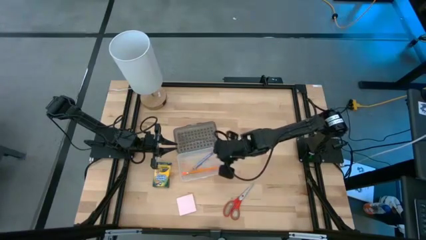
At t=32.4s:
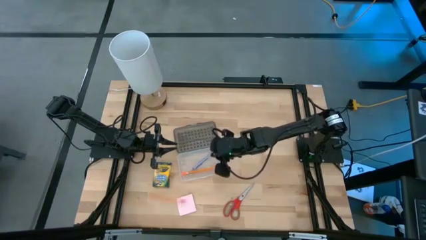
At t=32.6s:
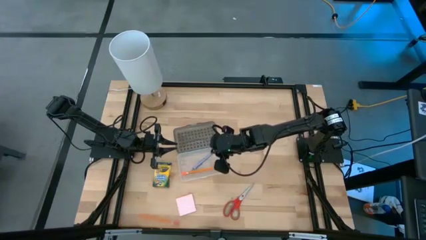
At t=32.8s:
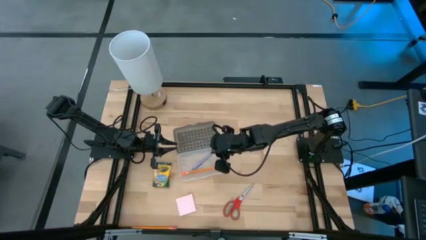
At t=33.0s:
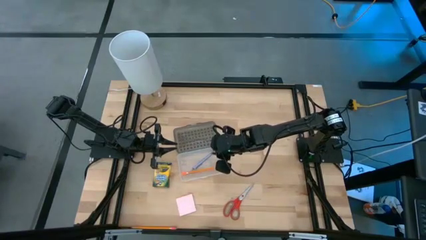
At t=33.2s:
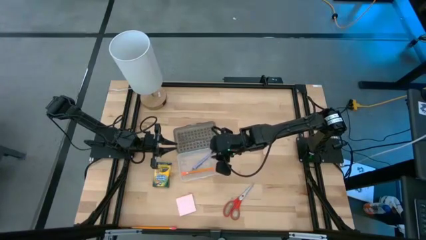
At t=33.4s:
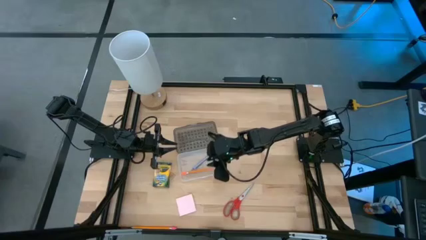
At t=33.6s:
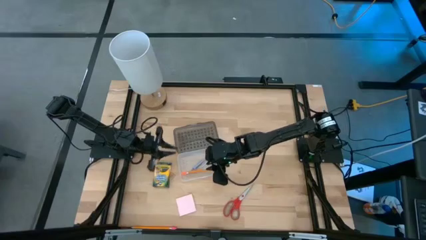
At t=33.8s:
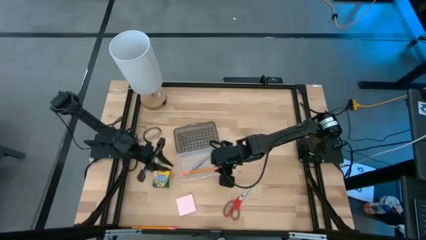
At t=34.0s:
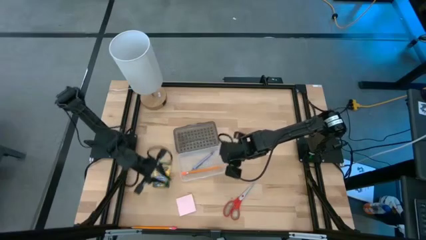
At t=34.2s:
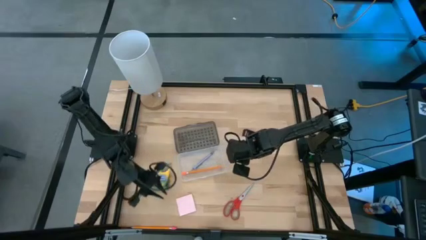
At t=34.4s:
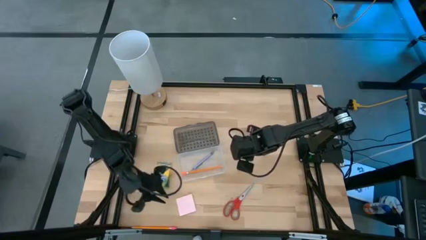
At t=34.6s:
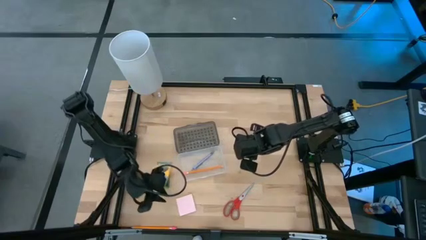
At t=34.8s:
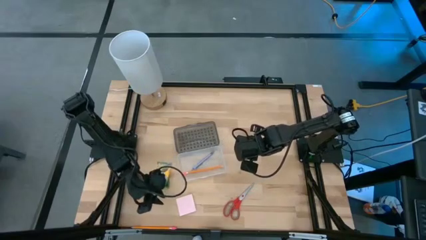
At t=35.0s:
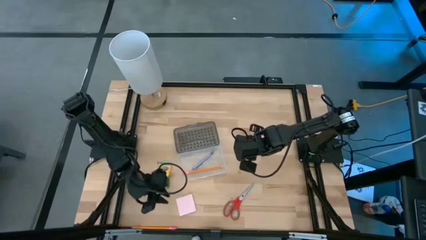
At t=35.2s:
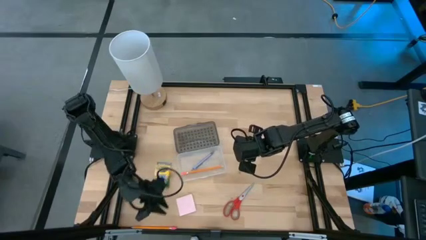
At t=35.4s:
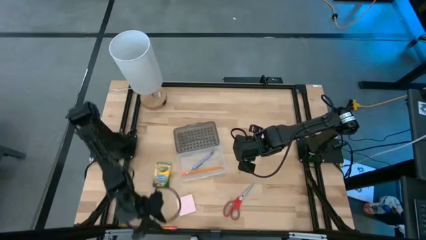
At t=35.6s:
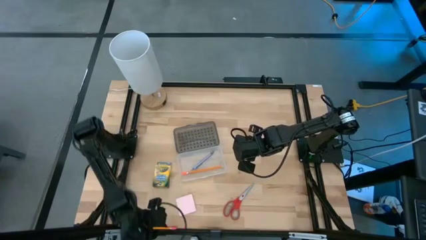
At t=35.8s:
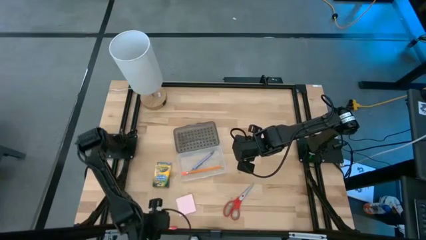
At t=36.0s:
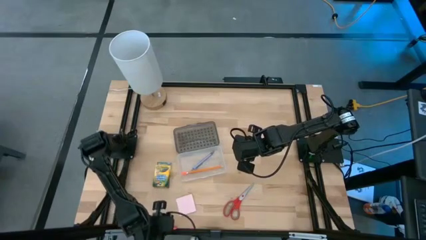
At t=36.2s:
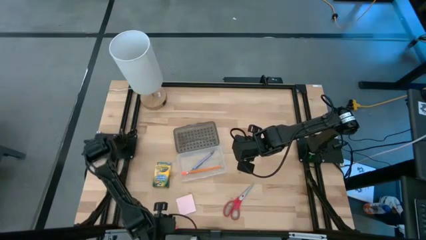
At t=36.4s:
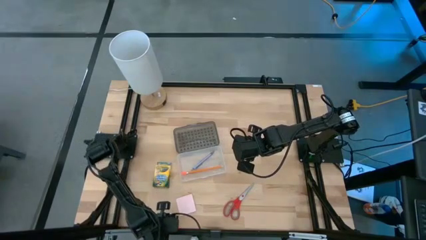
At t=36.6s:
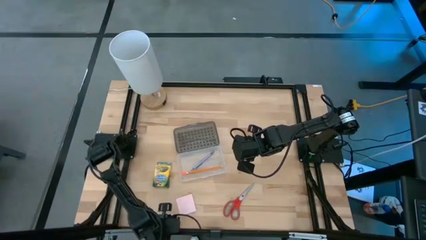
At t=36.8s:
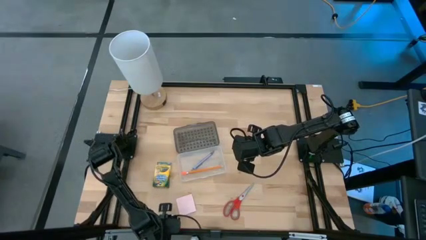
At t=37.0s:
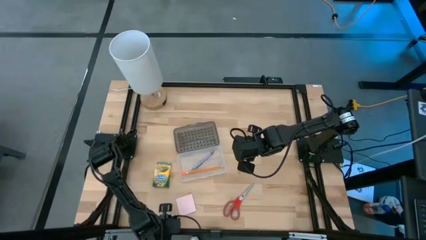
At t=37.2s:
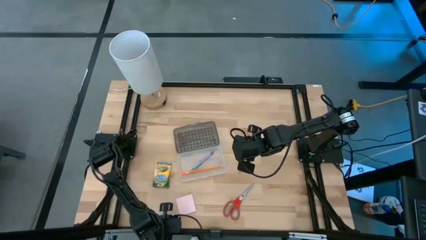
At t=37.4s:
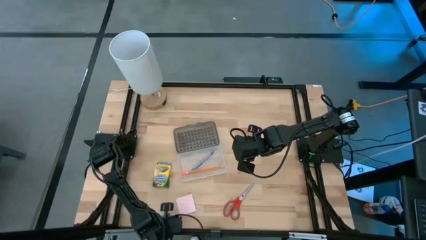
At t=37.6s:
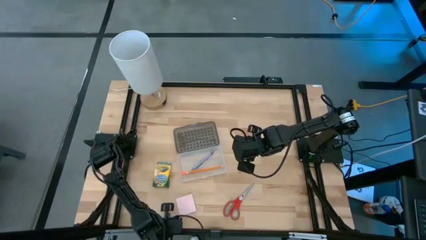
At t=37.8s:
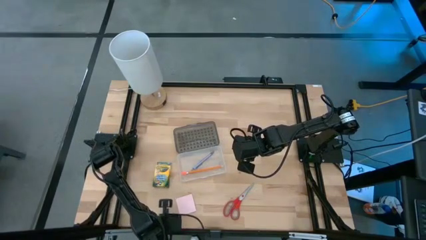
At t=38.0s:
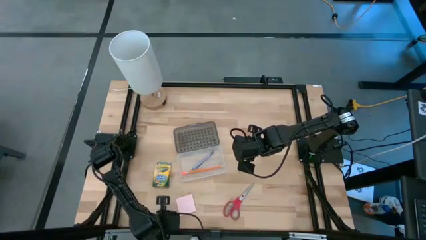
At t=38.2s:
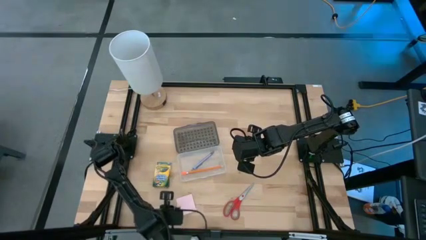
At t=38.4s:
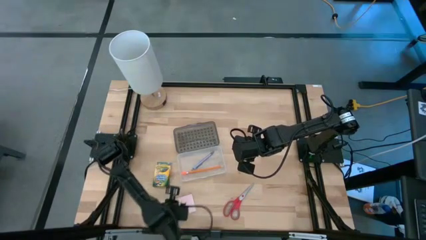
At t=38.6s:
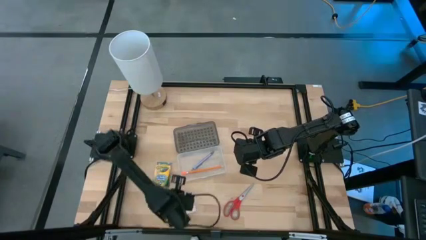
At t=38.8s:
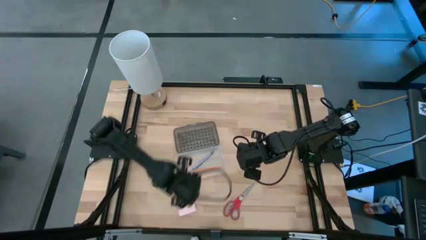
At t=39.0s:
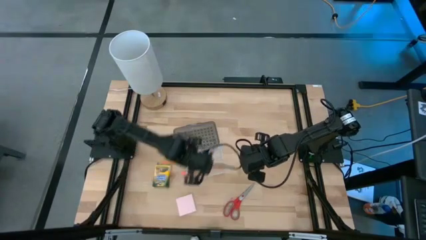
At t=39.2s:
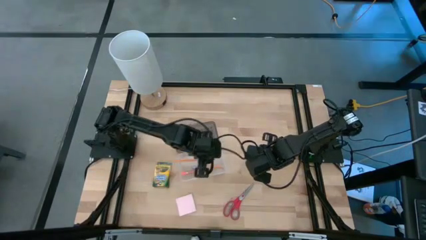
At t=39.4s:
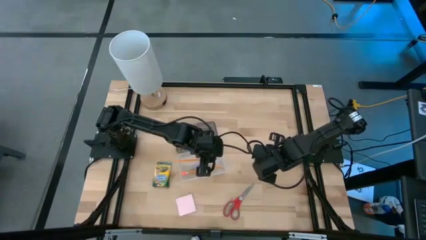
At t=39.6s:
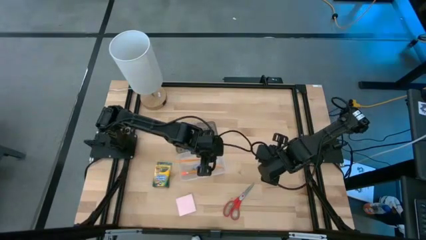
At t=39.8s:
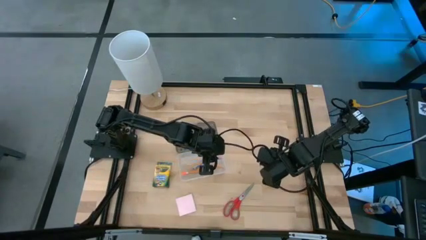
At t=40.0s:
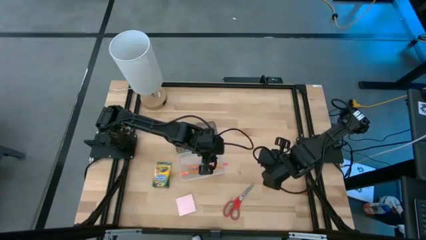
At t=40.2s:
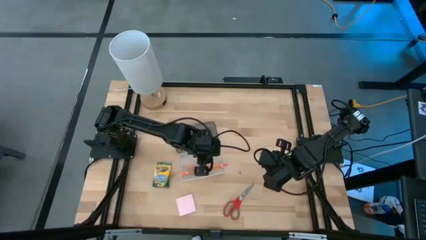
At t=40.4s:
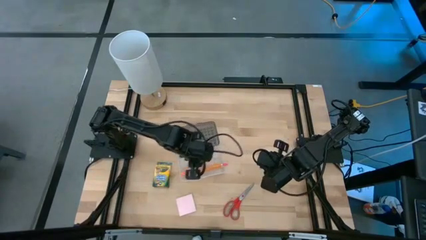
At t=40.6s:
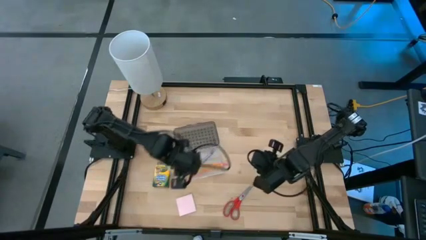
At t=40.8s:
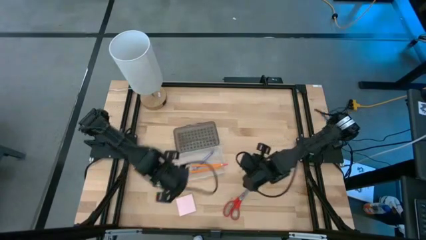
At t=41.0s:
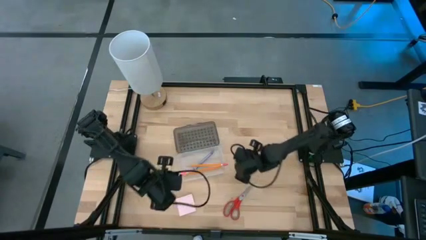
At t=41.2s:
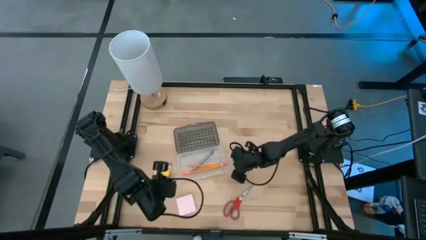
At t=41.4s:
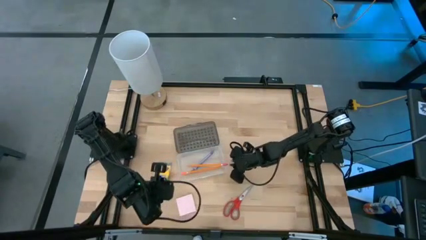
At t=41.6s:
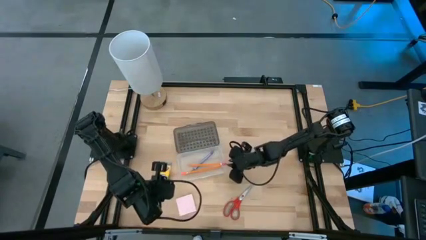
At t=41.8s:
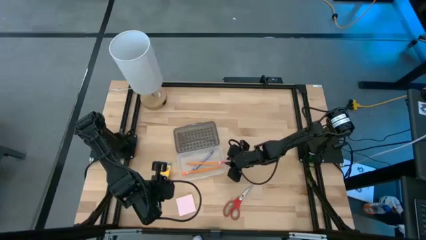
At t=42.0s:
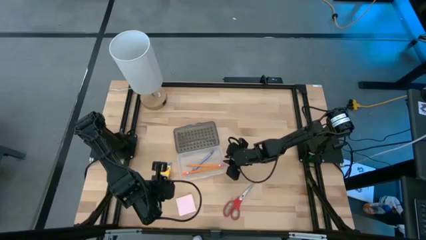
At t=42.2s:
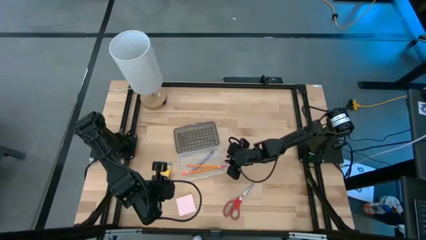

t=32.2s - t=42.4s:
Task: Pack school essentials
Put the orange pencil into the gray supply box

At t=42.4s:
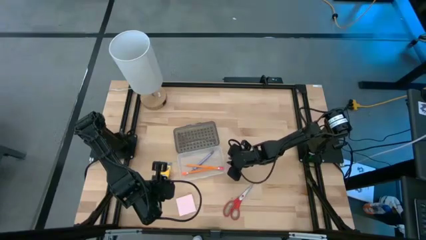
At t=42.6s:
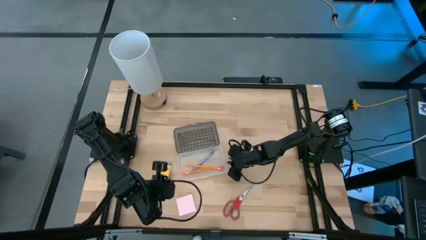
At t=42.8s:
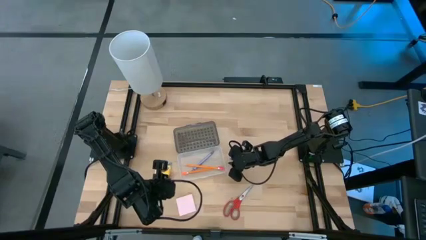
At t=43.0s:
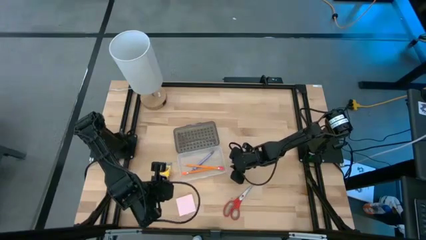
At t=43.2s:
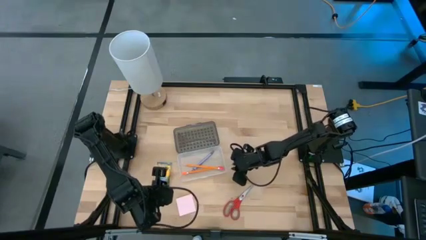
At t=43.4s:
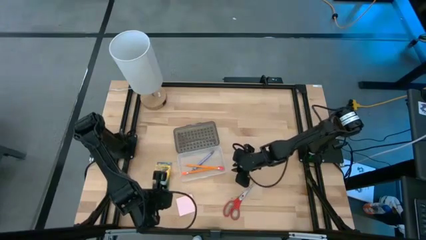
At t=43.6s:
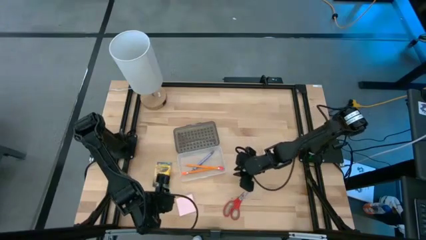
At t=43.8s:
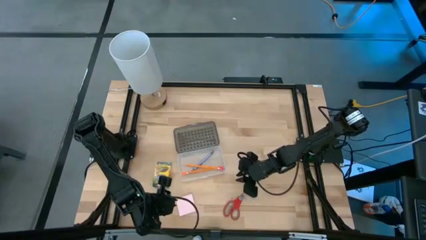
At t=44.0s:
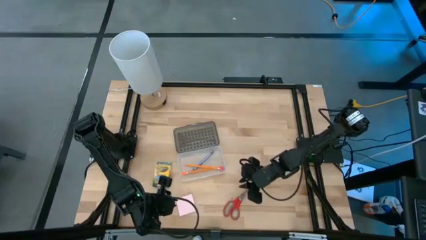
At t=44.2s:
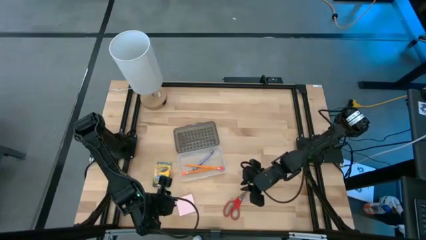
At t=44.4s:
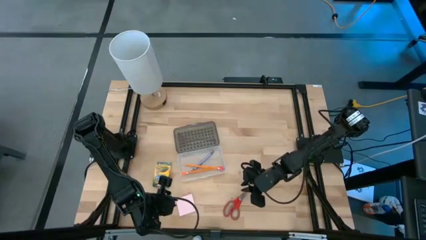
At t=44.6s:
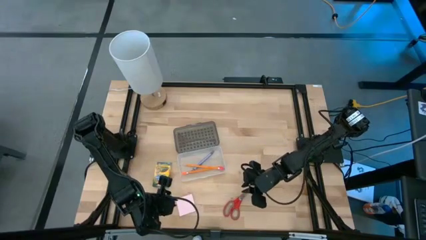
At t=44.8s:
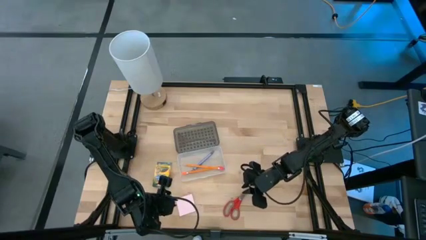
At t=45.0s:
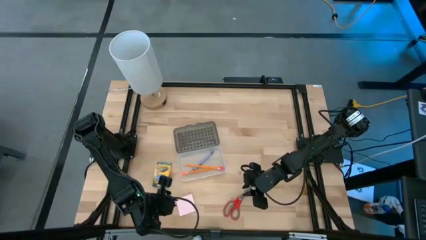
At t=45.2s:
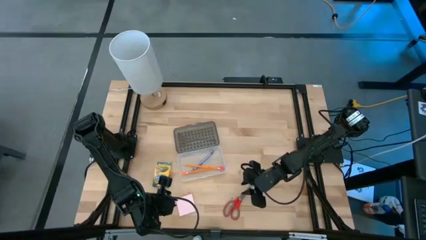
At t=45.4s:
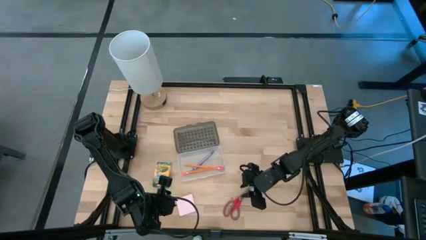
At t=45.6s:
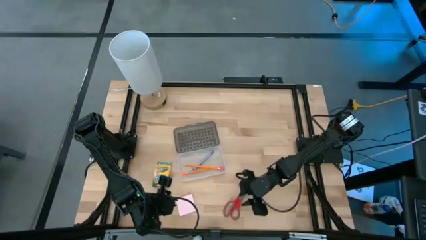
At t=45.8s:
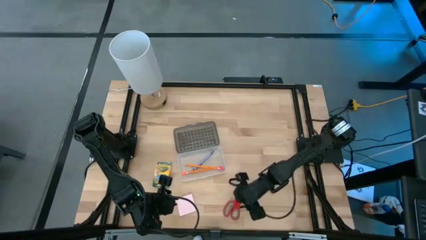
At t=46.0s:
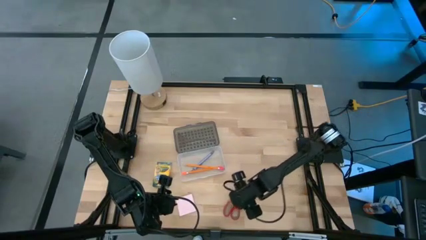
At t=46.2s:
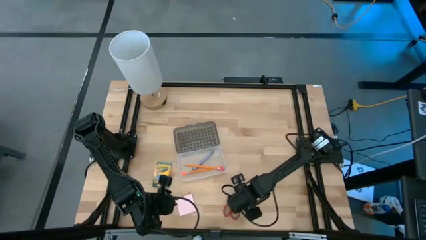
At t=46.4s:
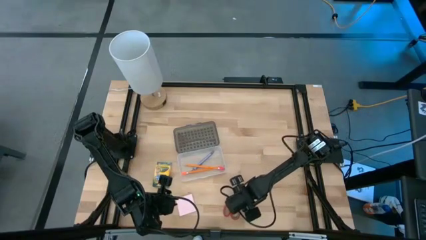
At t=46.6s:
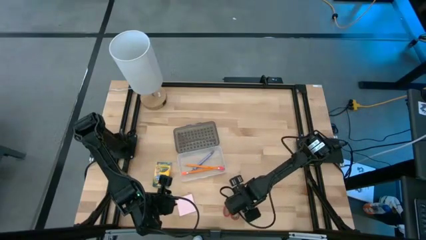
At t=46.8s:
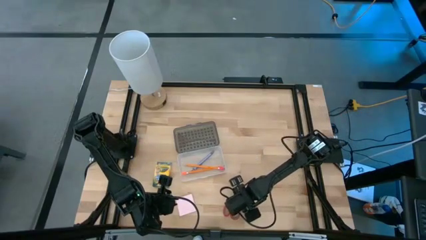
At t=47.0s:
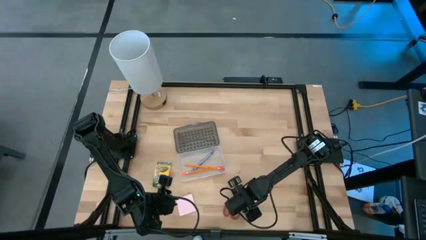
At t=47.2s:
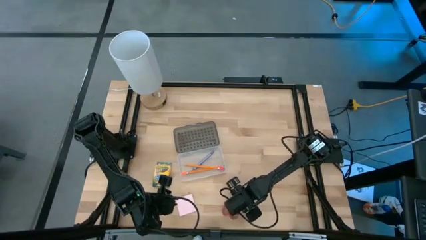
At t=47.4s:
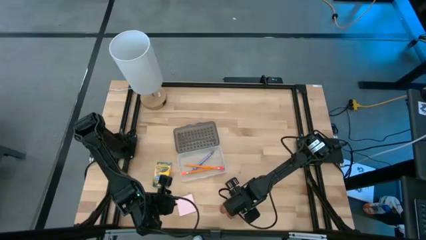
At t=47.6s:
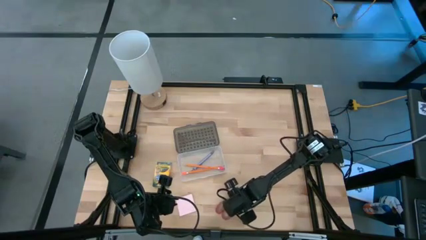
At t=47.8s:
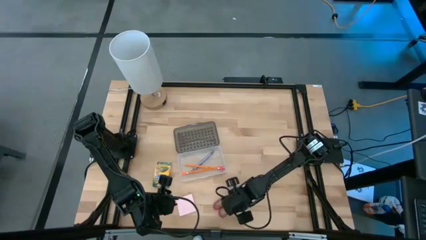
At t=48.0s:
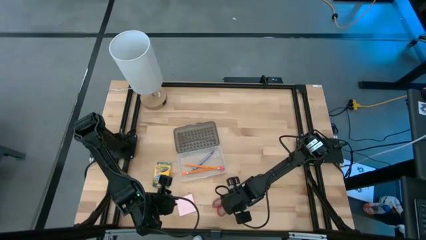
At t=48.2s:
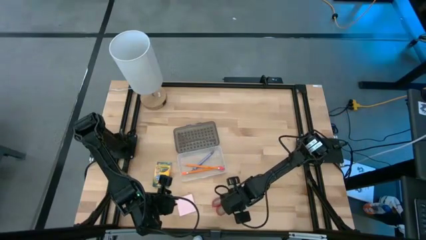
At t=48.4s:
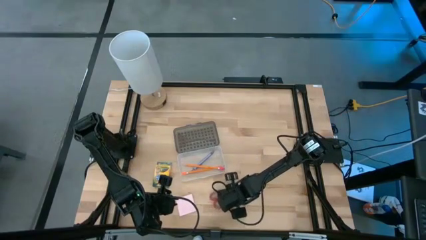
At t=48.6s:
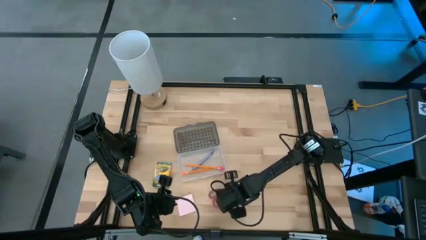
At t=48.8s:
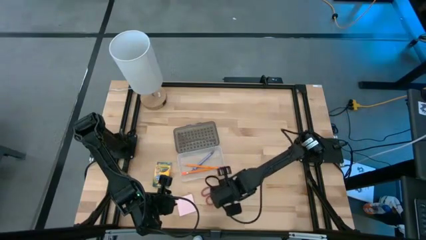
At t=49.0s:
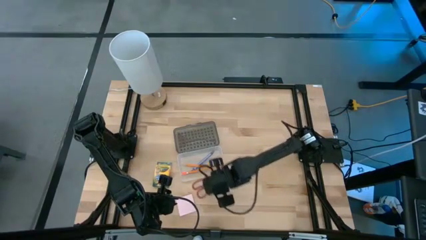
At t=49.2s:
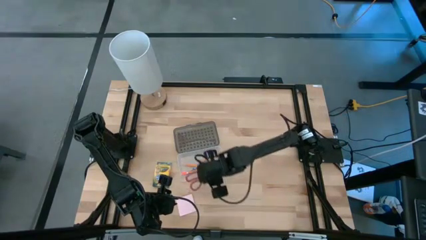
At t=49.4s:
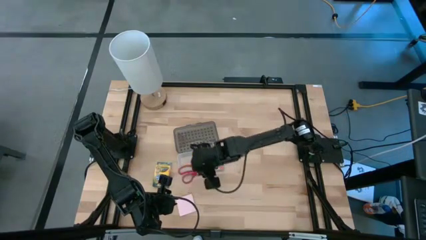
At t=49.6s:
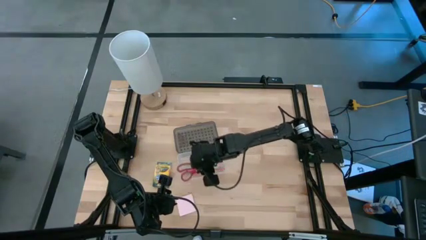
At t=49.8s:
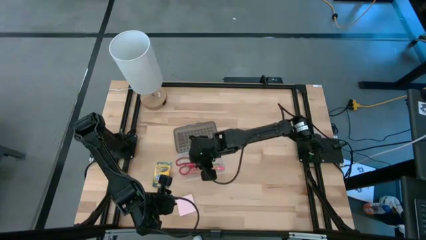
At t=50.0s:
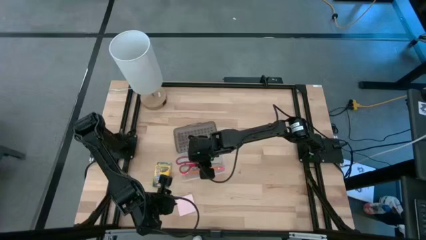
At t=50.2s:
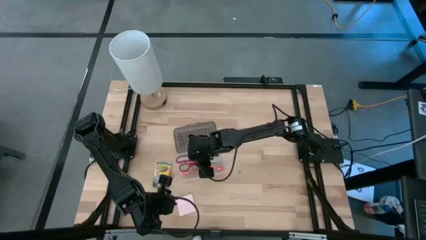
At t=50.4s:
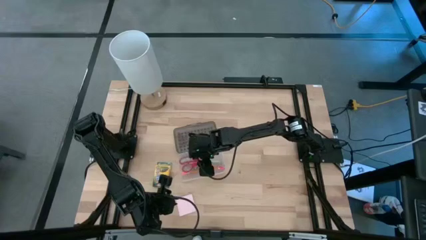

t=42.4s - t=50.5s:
Put the red scissors into the gray supply box
